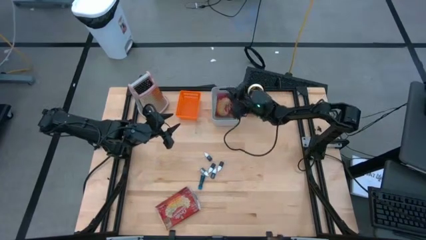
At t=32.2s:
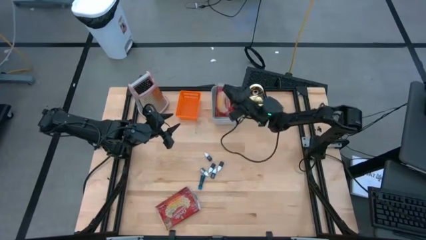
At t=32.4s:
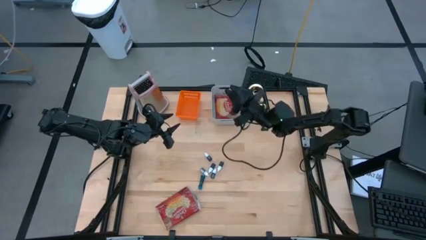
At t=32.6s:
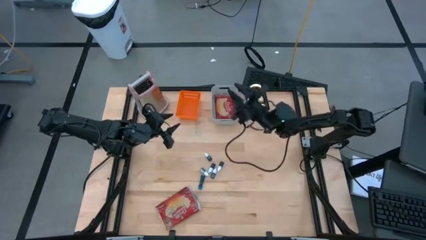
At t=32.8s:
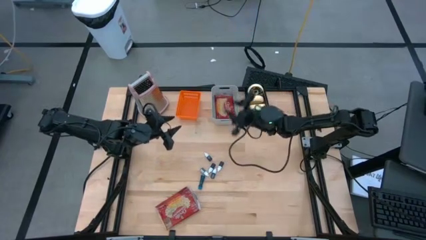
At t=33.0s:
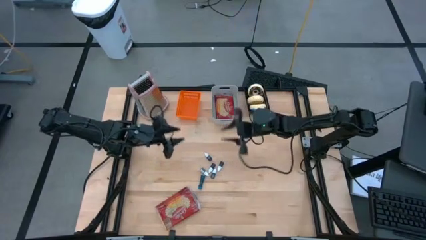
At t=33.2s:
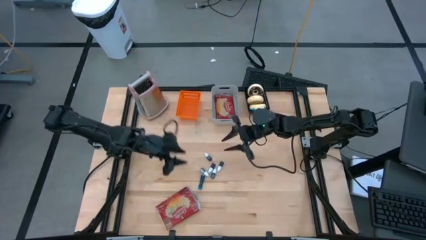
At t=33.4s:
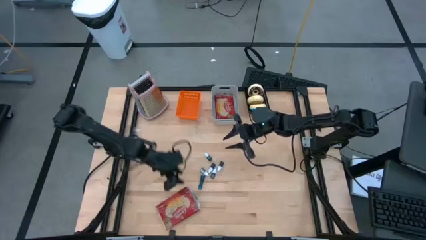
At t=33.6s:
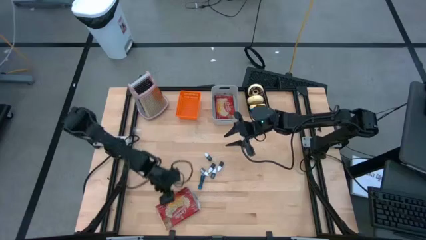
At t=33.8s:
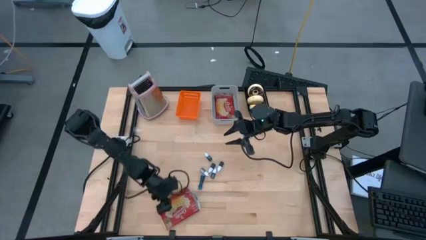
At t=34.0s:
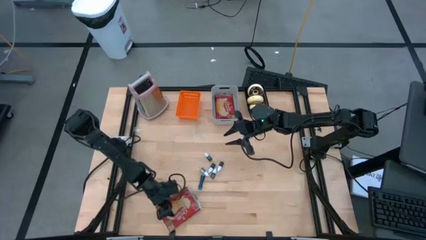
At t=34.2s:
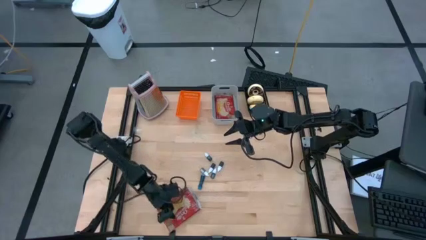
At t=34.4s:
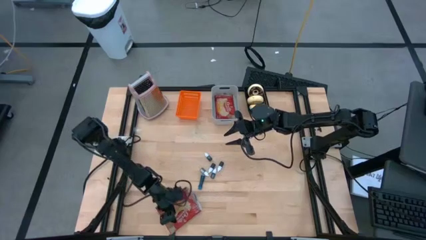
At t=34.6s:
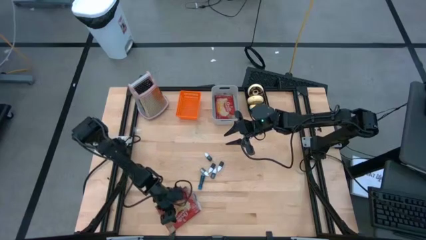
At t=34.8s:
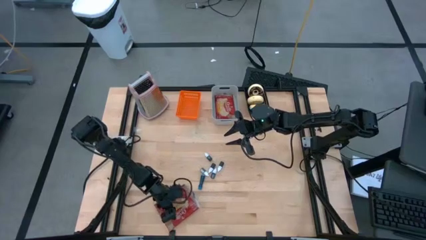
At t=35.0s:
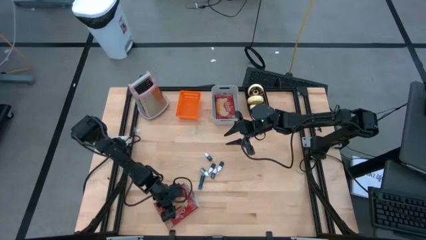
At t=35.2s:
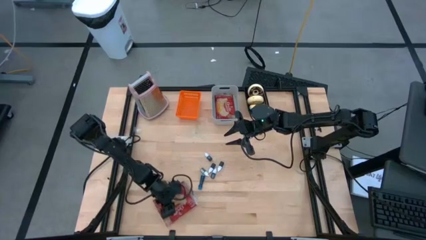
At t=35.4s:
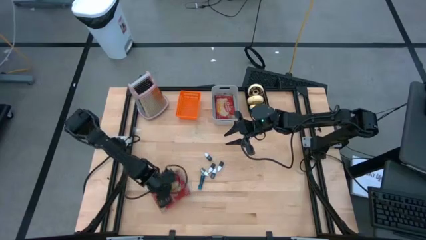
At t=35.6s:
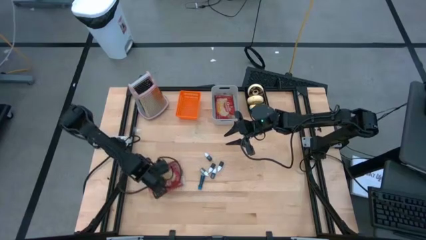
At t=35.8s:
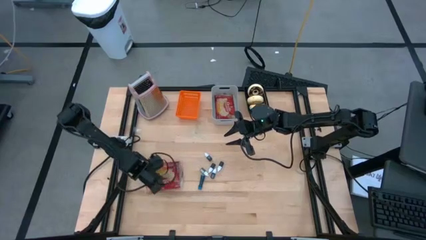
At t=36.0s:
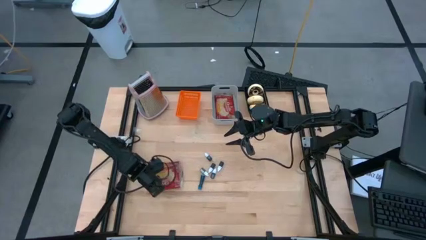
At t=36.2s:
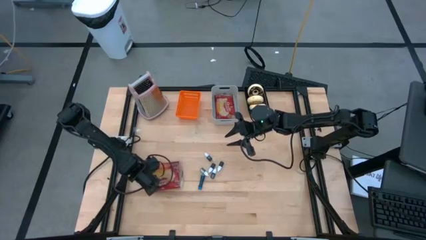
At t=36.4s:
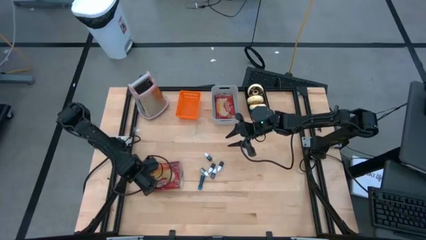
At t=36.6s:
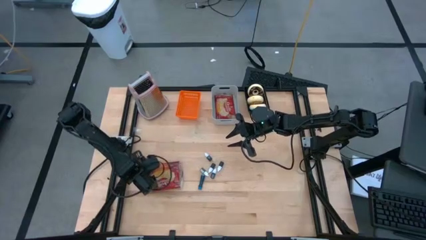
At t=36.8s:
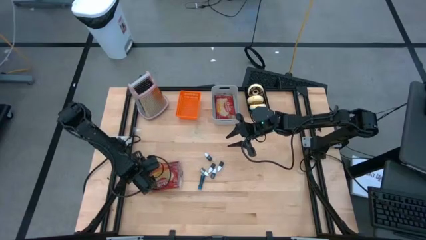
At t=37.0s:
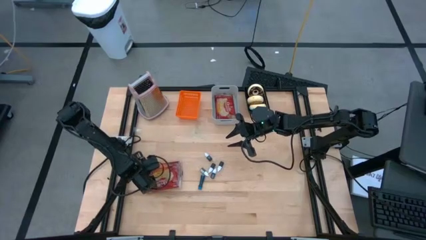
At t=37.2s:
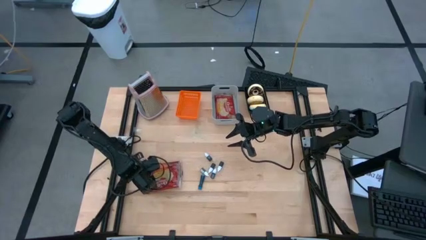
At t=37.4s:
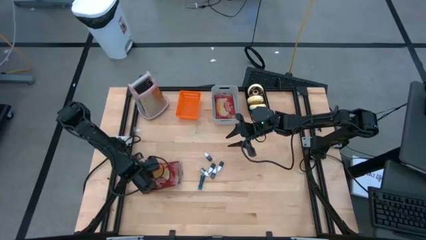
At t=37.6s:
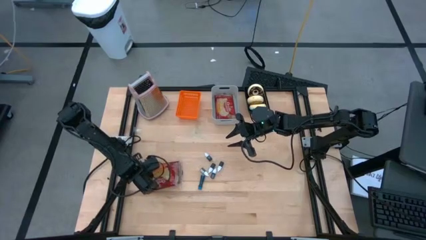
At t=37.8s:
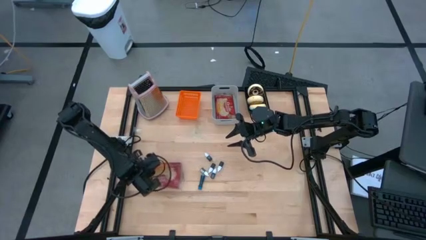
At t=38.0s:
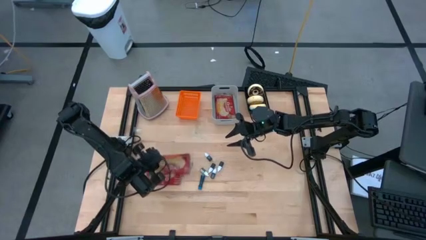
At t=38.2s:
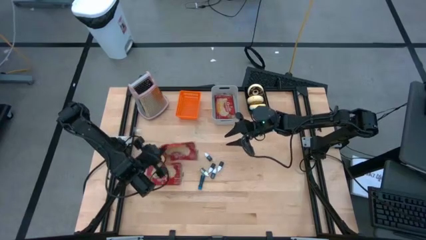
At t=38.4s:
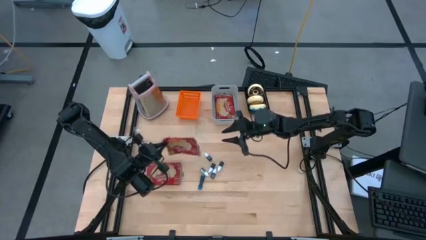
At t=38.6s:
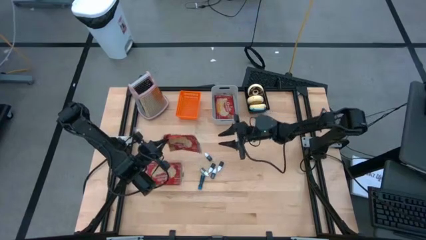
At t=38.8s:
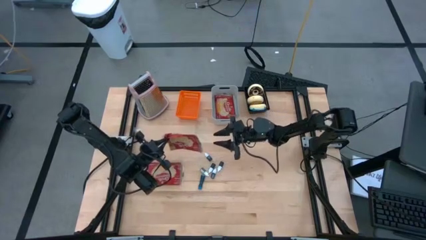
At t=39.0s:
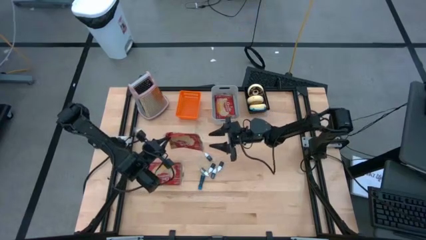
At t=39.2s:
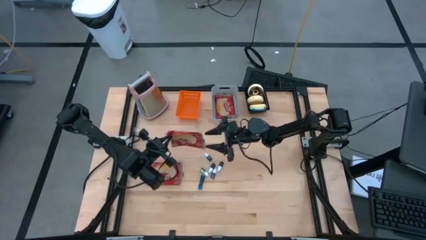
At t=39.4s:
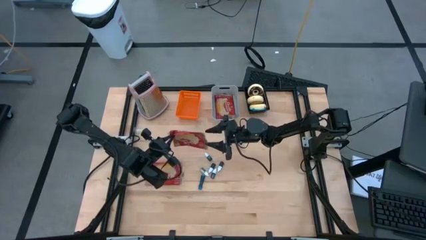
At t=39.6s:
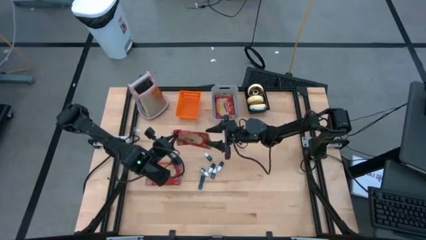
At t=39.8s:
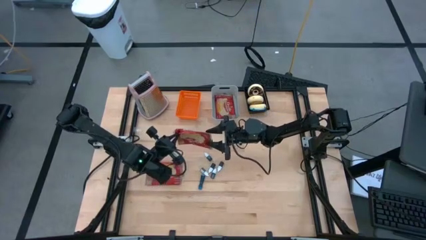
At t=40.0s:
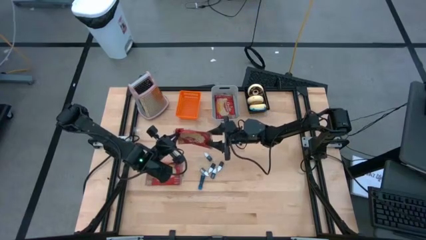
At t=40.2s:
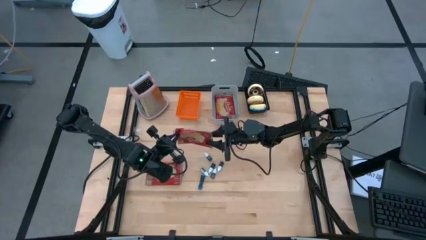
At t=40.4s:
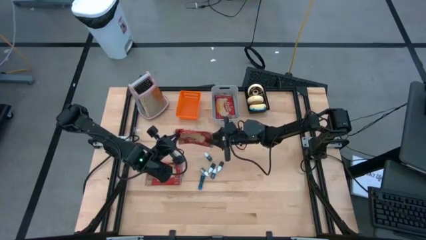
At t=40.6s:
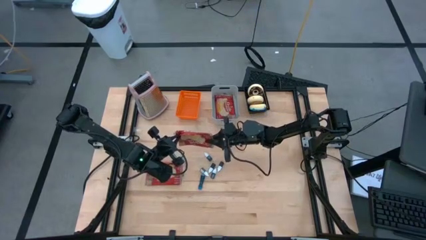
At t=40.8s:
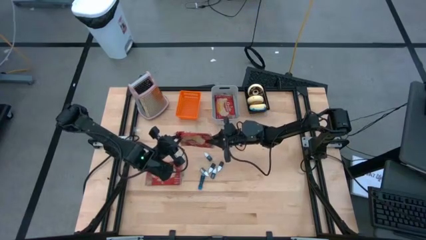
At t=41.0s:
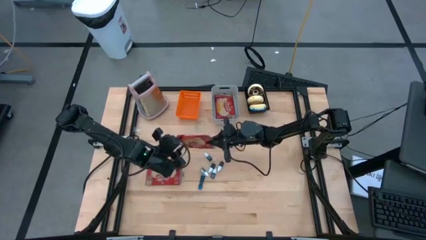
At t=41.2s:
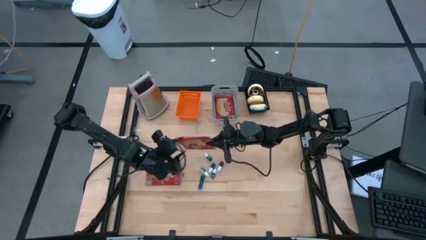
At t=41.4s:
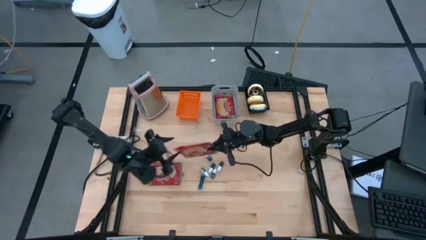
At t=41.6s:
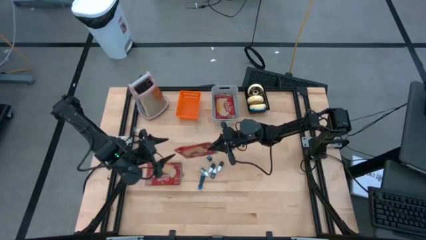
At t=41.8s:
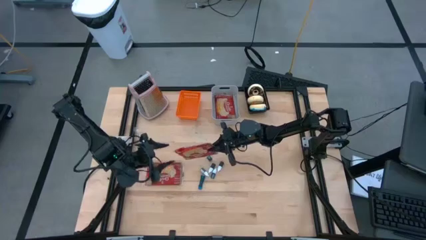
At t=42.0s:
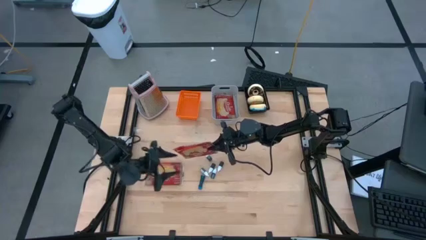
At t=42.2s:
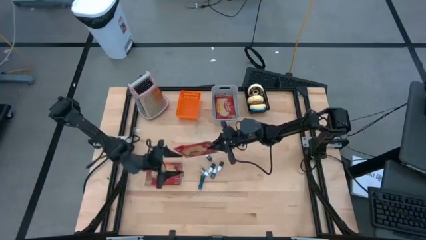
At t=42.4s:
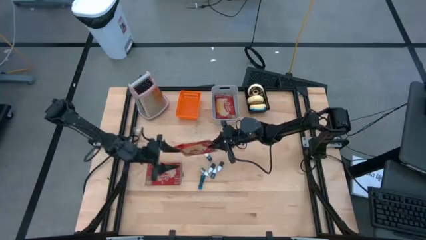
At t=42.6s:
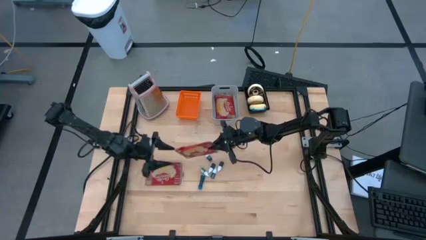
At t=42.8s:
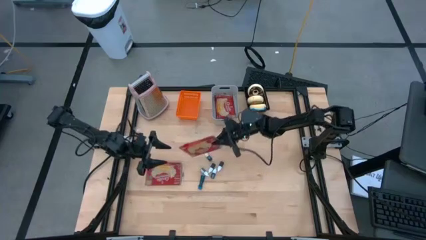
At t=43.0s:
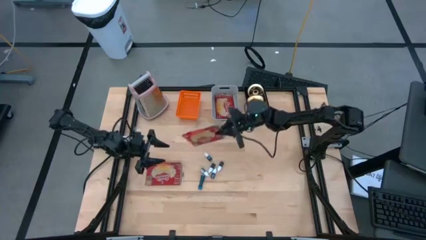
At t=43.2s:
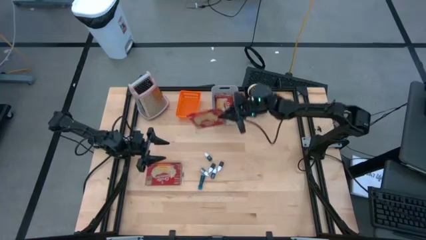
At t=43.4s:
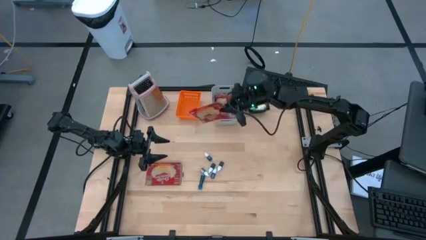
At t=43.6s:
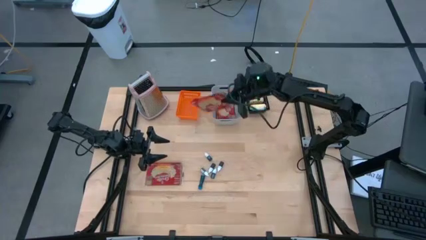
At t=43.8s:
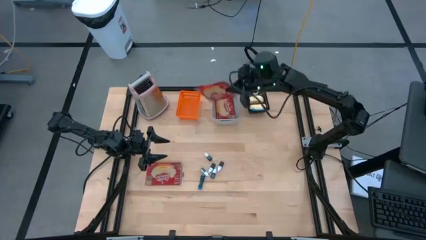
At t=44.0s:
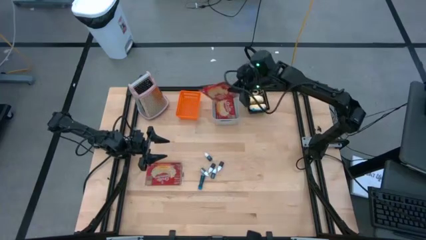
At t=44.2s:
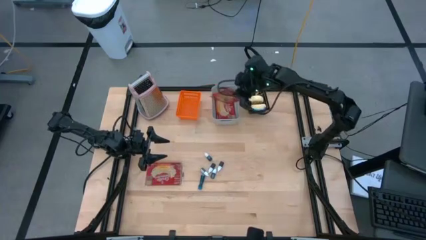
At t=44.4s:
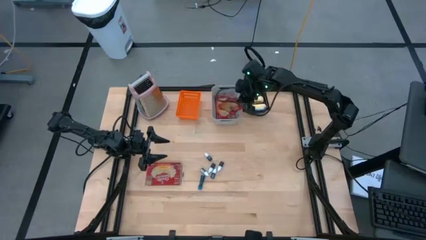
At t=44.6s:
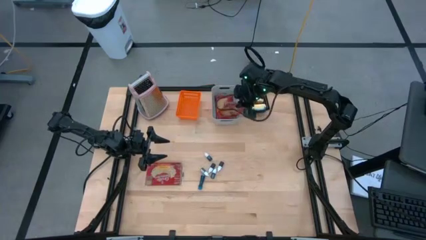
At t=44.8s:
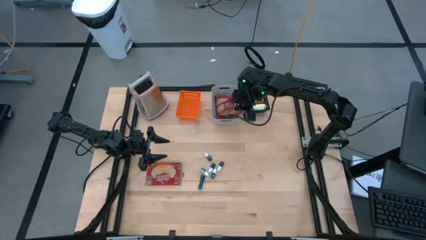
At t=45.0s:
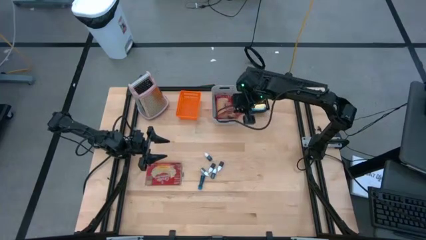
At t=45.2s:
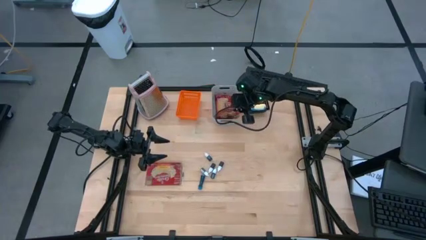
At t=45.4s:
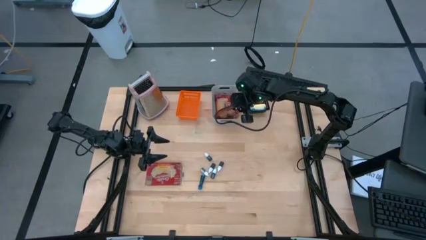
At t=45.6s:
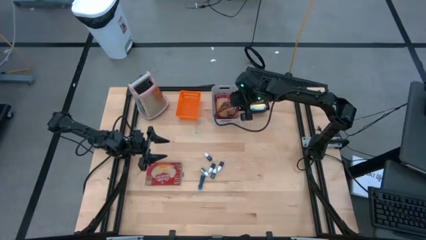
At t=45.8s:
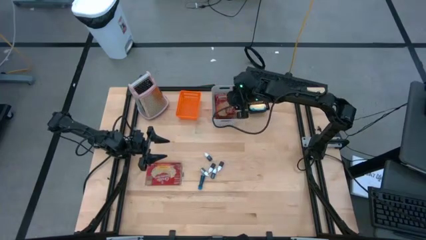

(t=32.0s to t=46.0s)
Put the red popcorn package into the gray bin
